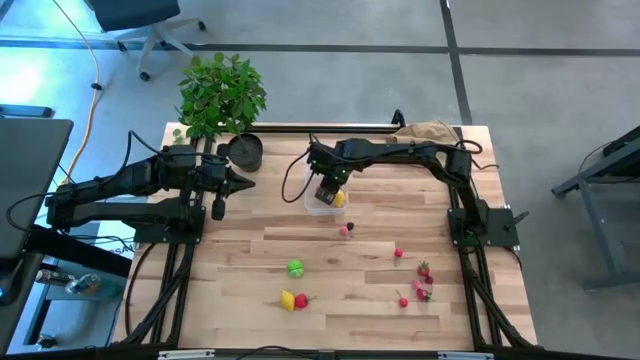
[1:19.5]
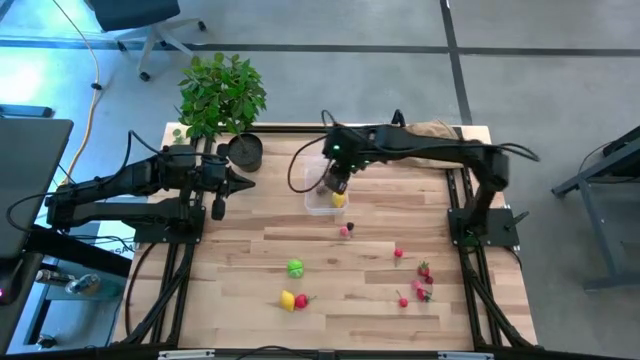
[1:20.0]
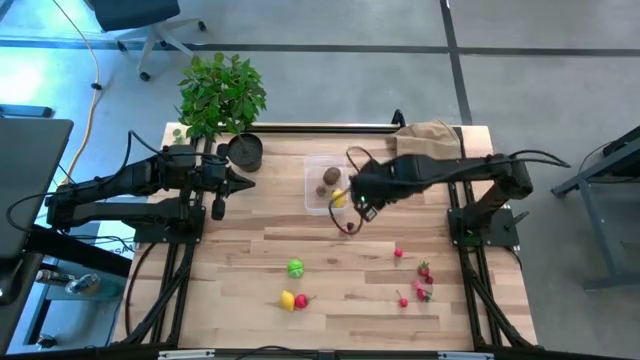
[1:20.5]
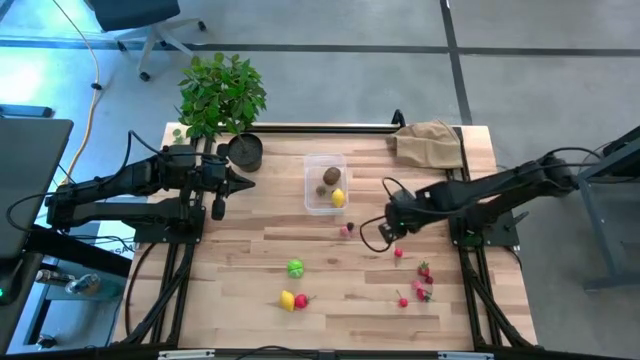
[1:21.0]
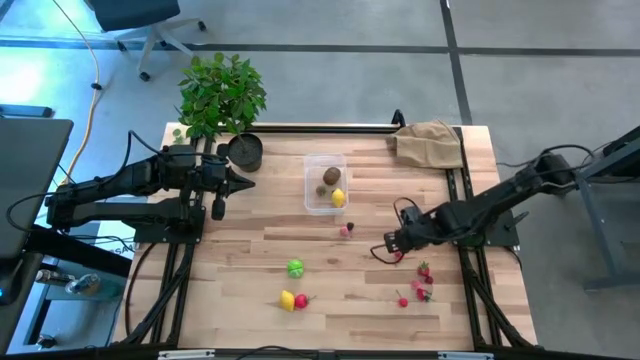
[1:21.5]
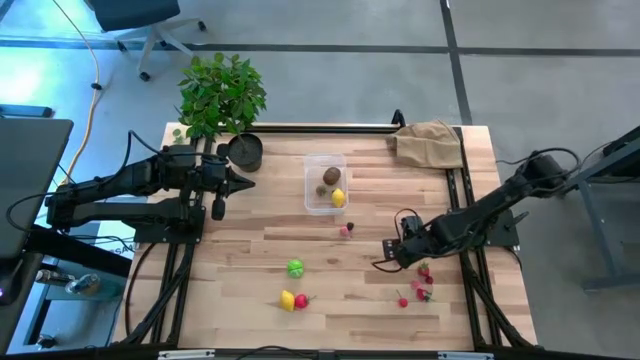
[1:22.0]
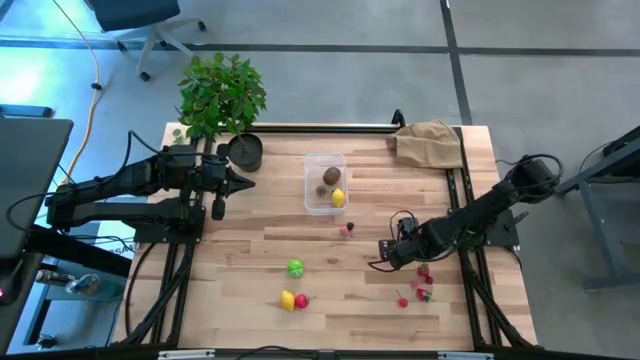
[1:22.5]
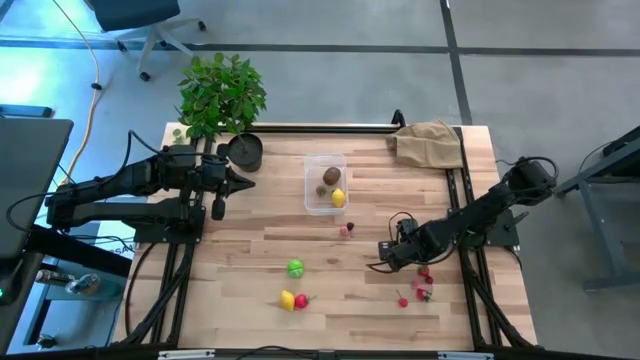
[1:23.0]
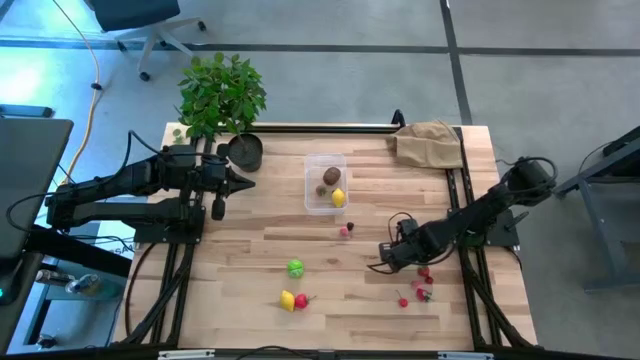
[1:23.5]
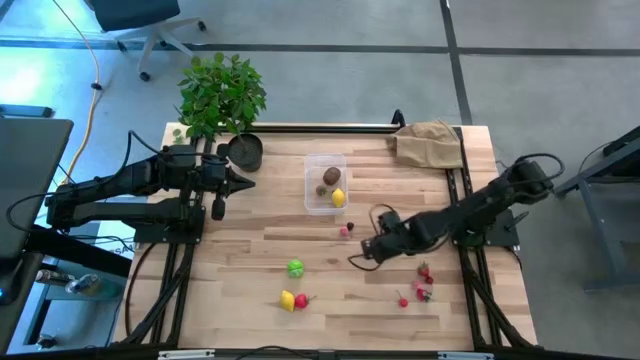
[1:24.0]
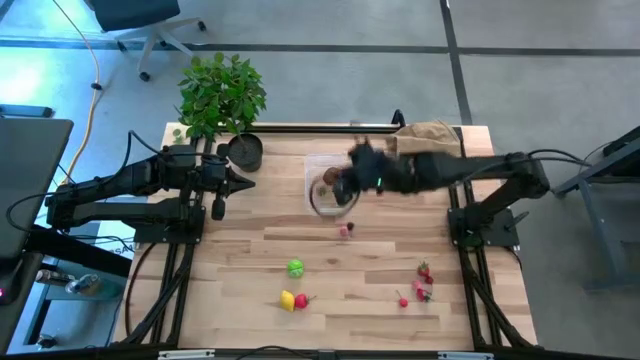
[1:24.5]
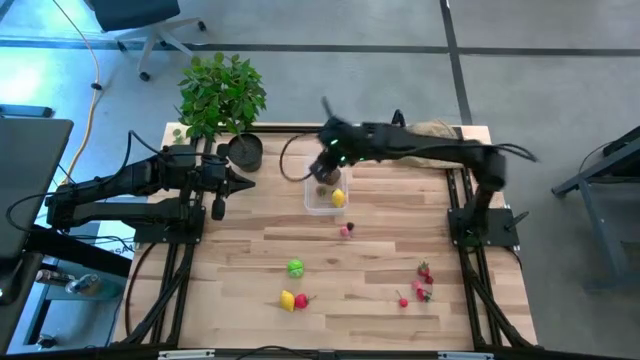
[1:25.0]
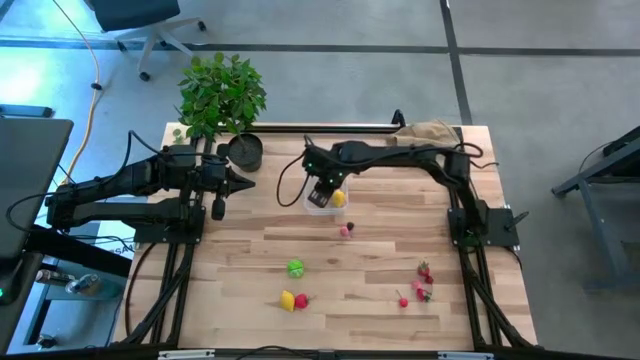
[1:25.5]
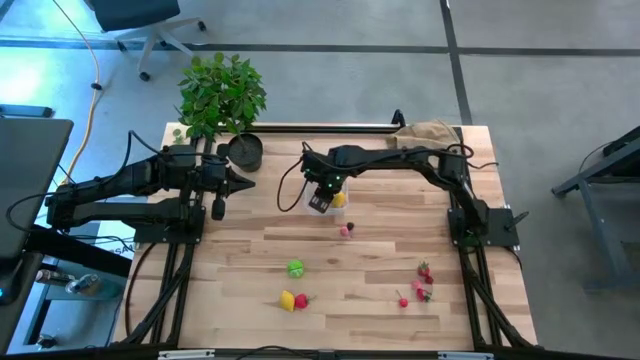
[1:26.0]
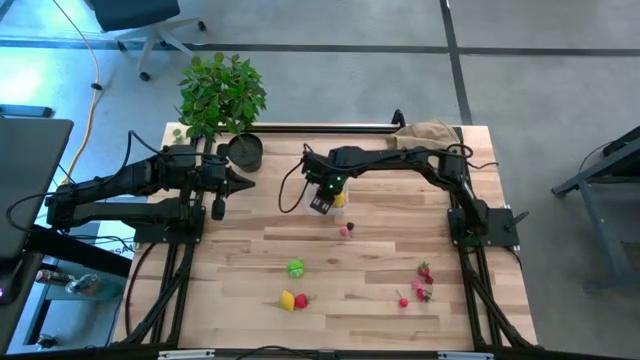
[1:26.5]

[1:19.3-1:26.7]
Task: Pick and placing Produce into tupperware
Put the top red cherry into the transparent bin

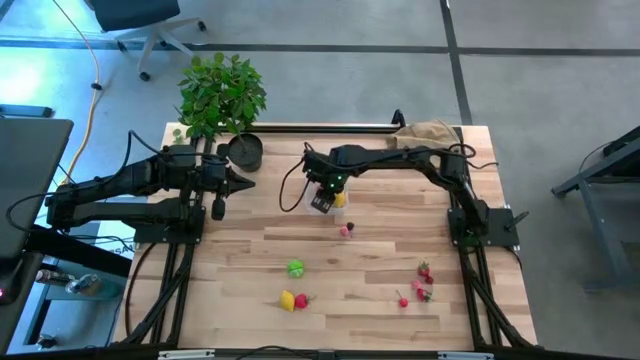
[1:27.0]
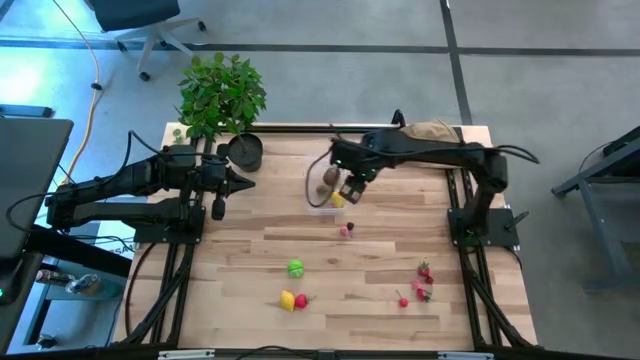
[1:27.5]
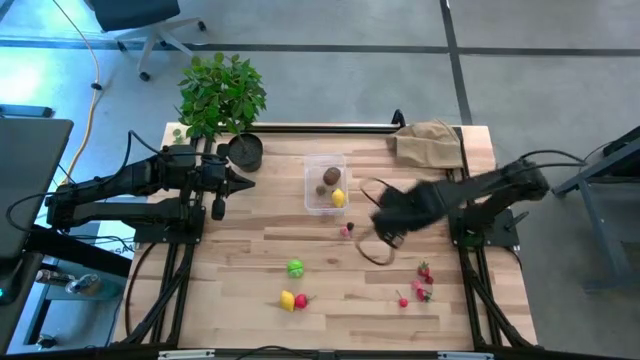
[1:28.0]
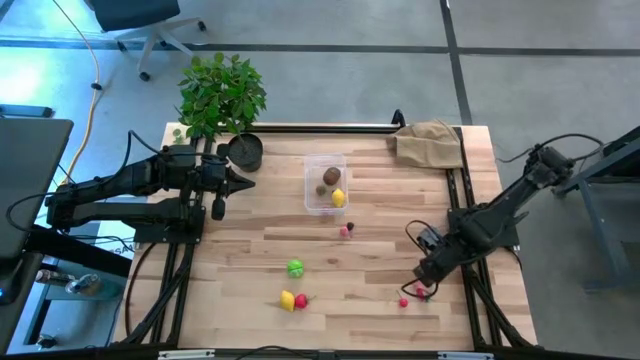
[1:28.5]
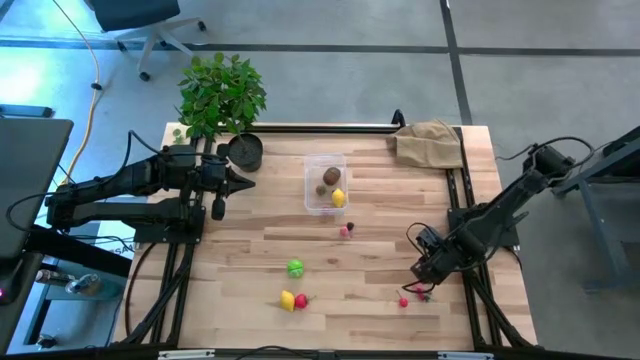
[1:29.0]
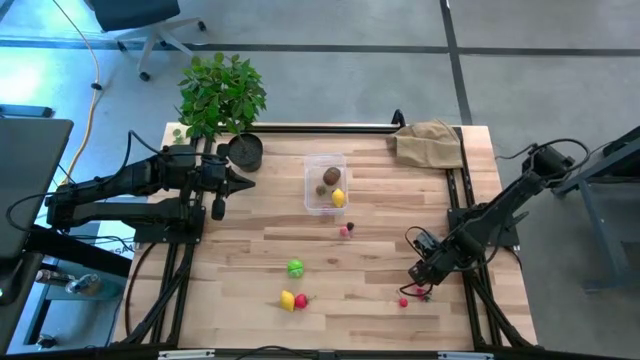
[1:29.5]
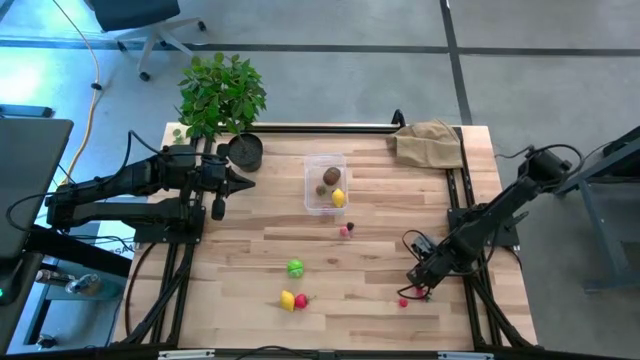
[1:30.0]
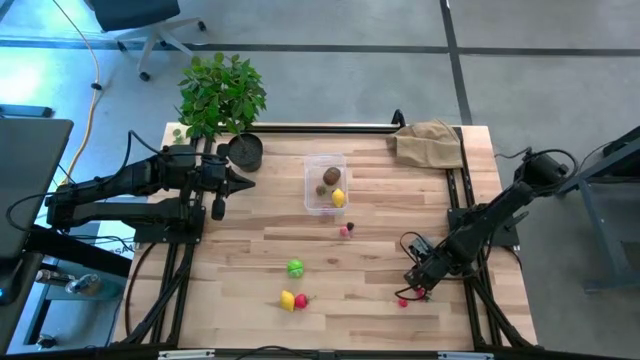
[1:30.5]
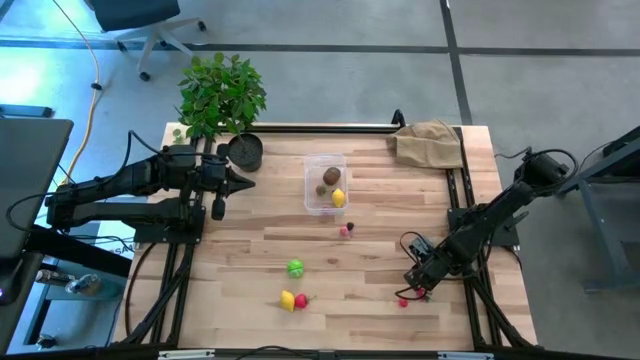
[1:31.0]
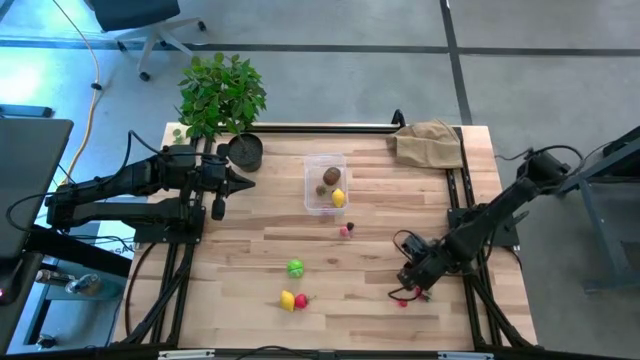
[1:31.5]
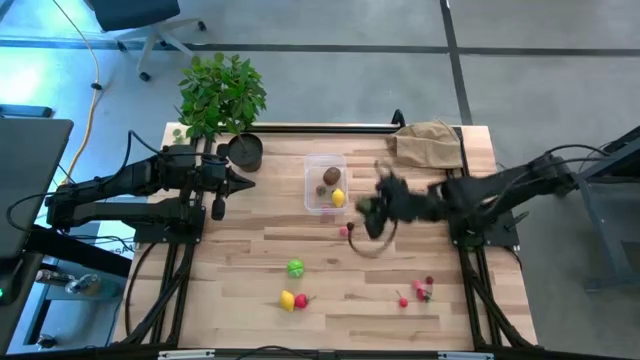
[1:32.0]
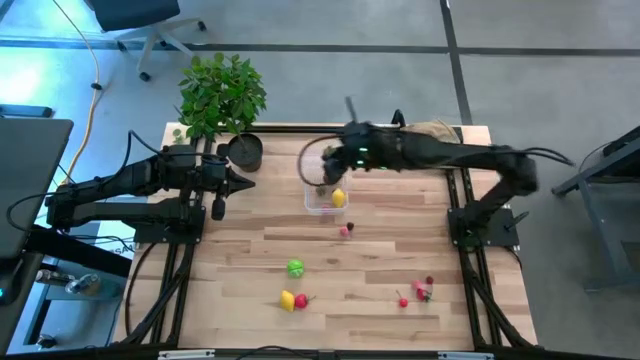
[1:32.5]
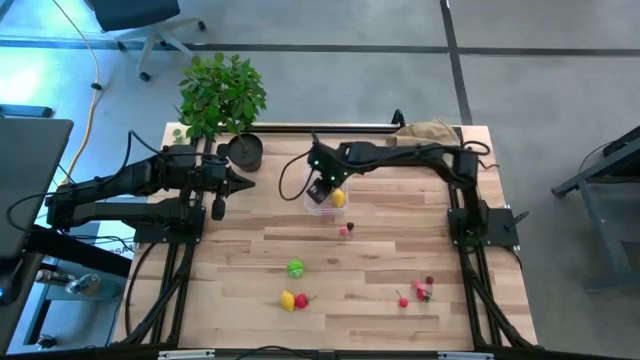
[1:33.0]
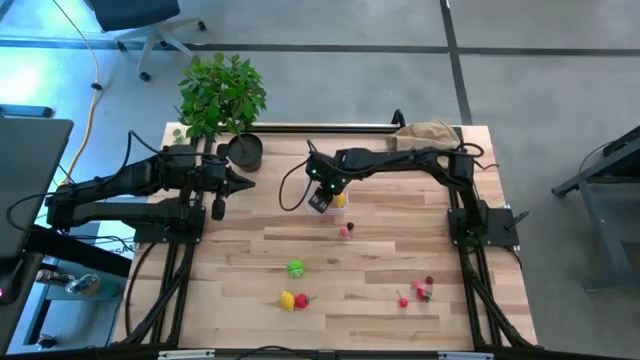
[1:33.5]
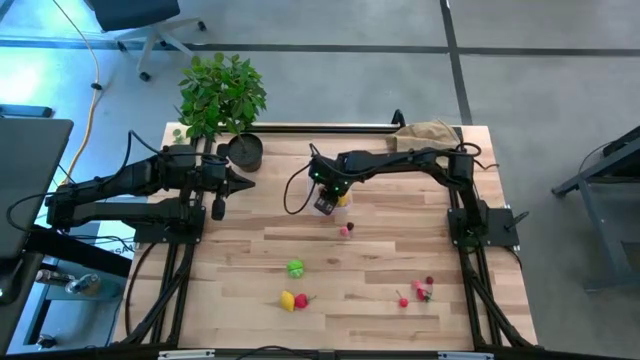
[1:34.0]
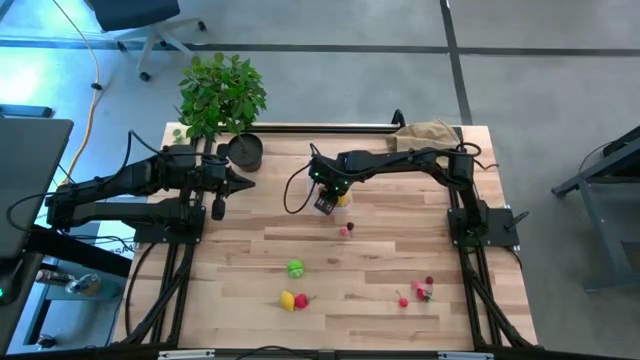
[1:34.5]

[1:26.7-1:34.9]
Put the top right red strawberry into the transparent bin

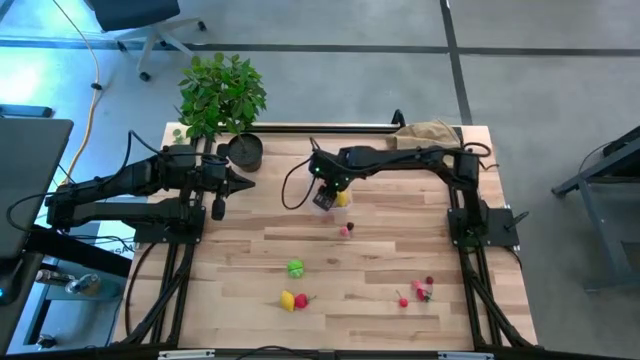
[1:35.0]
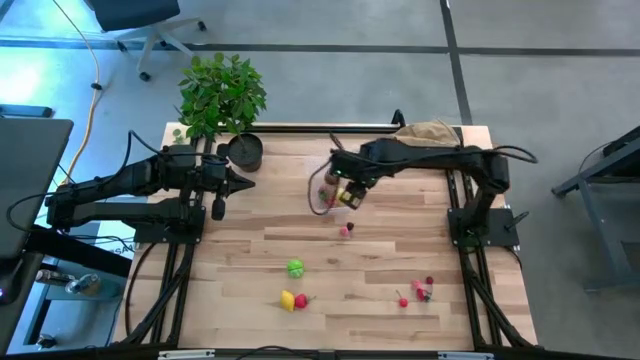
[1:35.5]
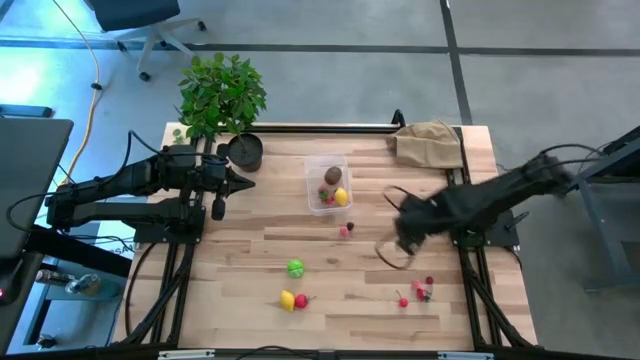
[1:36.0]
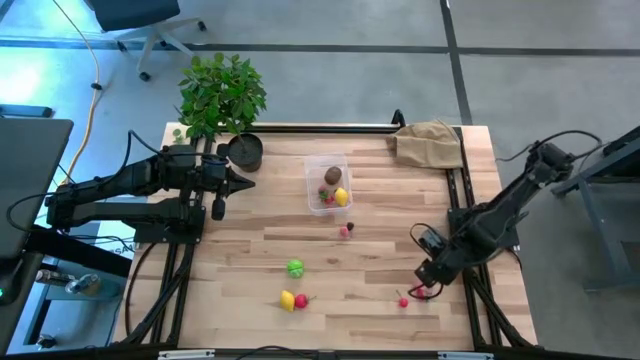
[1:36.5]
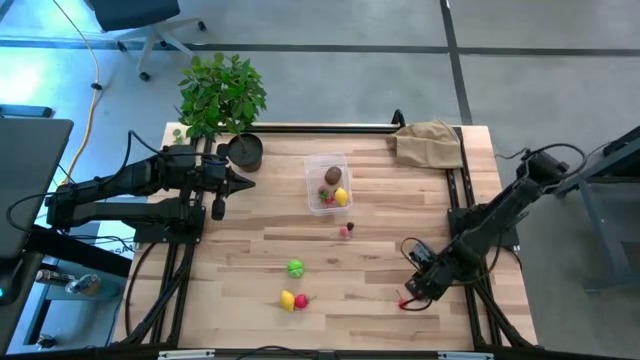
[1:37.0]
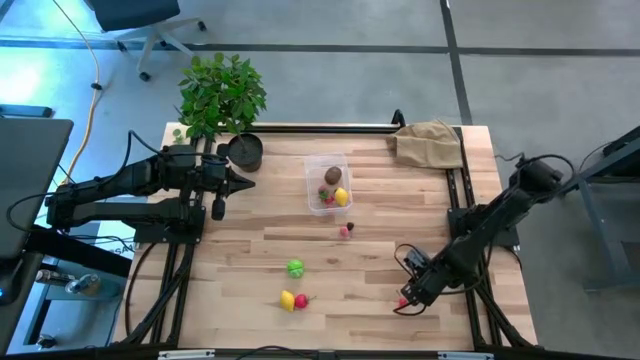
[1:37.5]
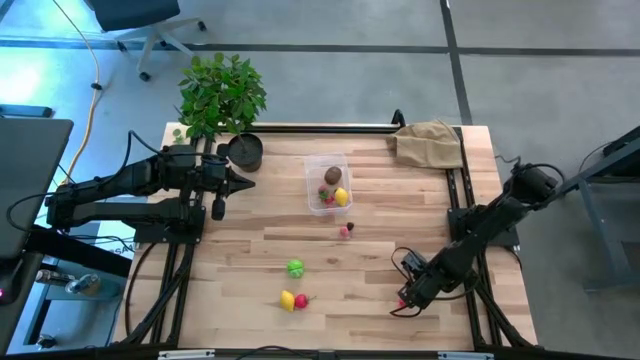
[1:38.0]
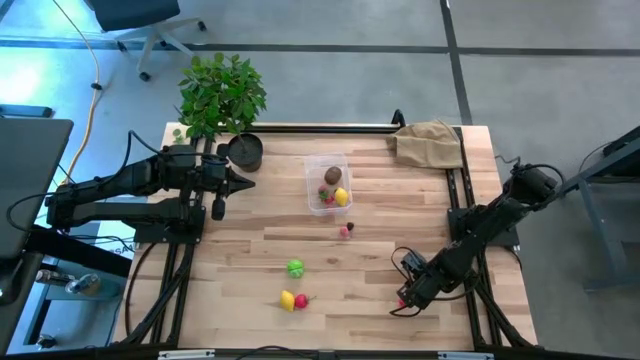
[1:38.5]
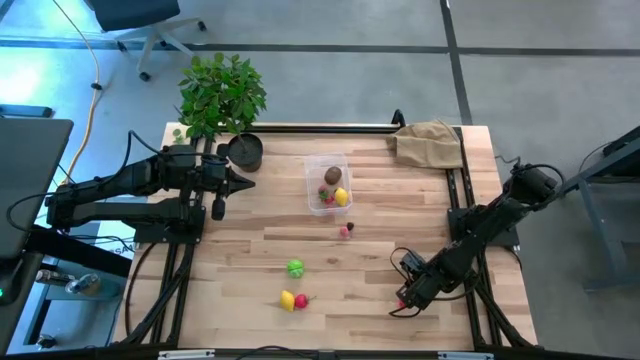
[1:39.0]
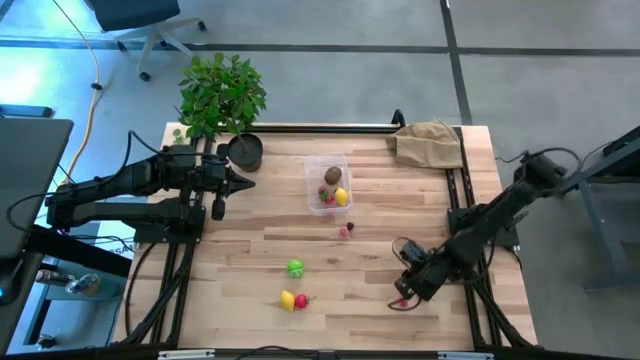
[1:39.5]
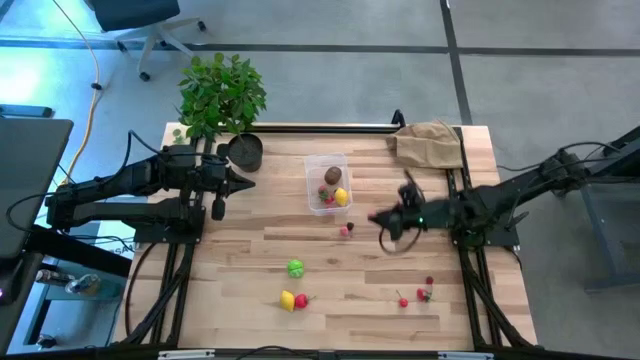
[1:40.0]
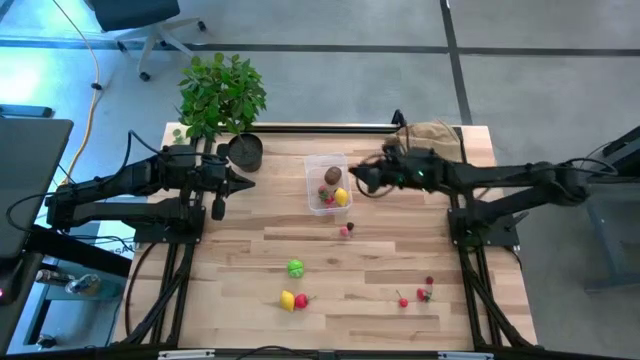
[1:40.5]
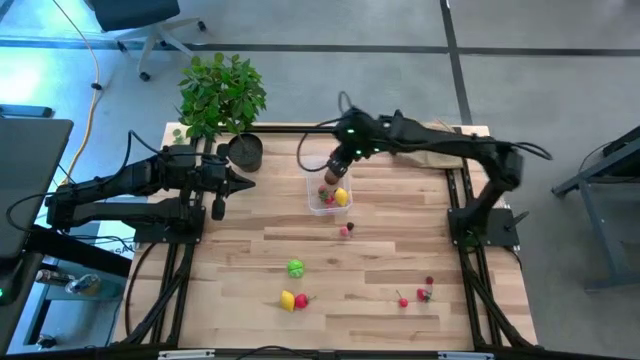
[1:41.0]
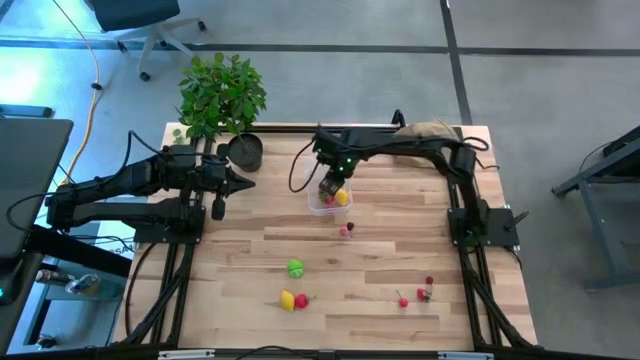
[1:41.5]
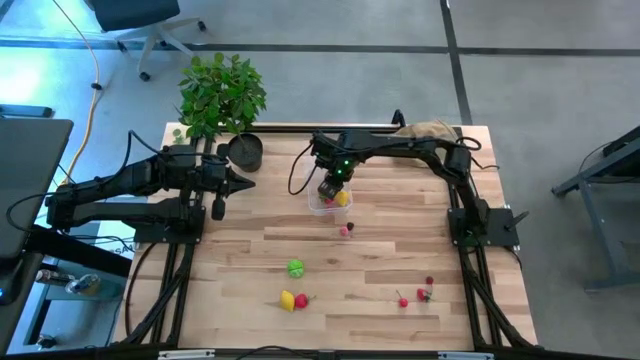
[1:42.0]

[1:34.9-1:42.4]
Put the bottom pink peach into the transparent bin
